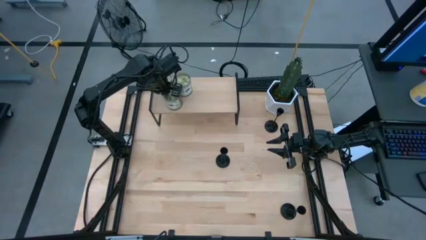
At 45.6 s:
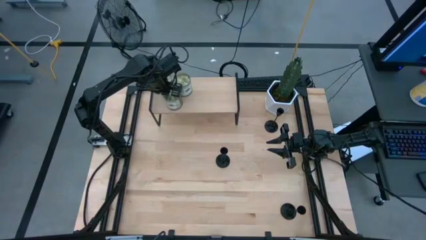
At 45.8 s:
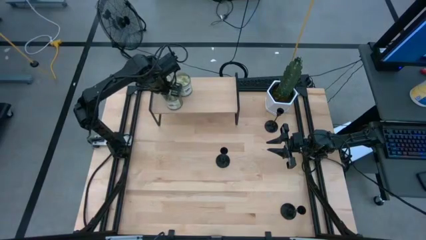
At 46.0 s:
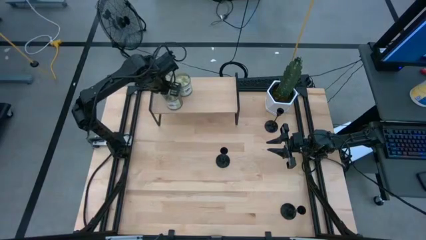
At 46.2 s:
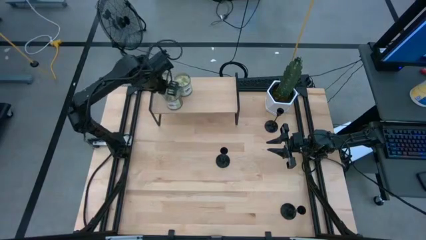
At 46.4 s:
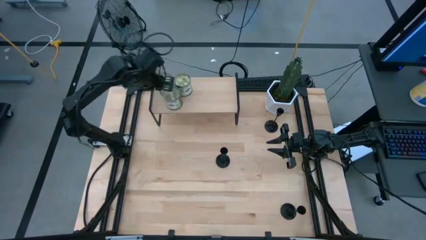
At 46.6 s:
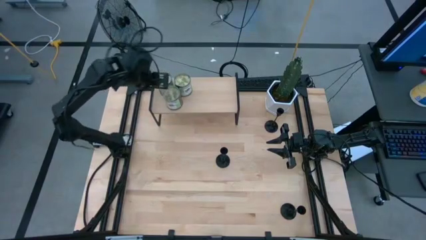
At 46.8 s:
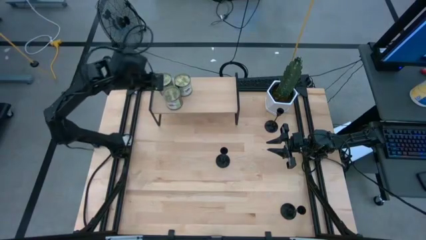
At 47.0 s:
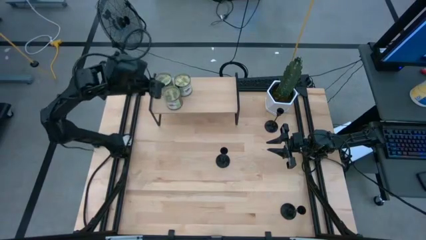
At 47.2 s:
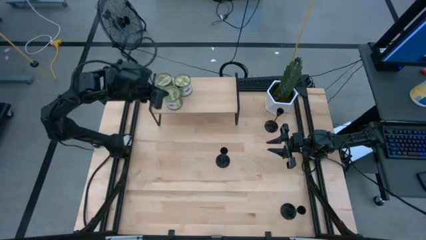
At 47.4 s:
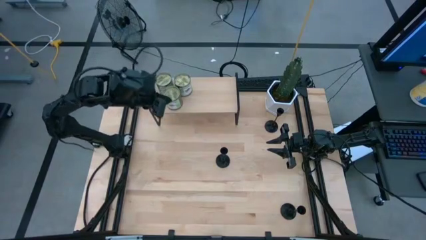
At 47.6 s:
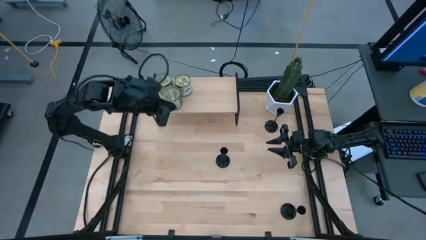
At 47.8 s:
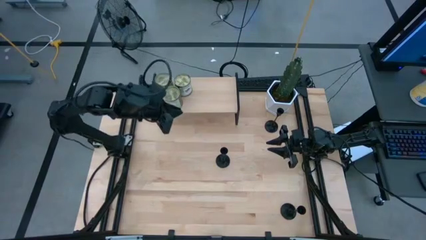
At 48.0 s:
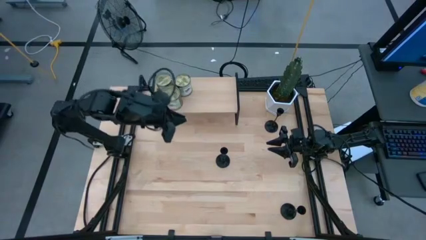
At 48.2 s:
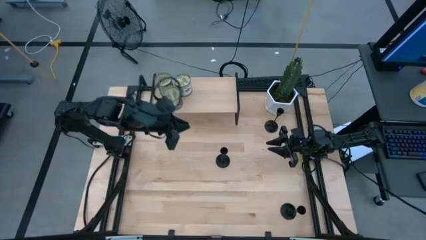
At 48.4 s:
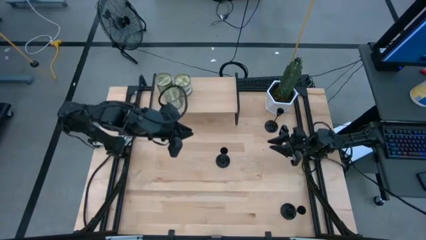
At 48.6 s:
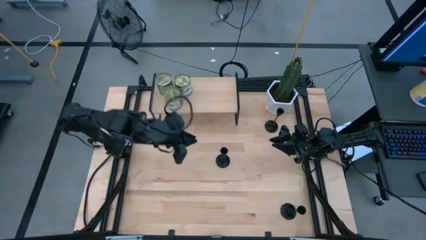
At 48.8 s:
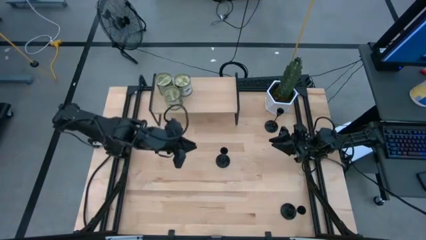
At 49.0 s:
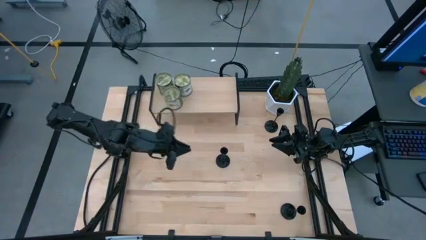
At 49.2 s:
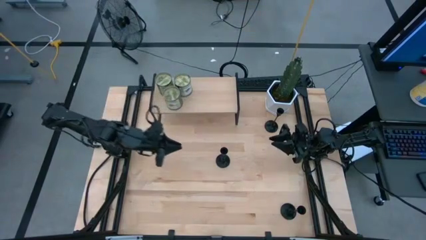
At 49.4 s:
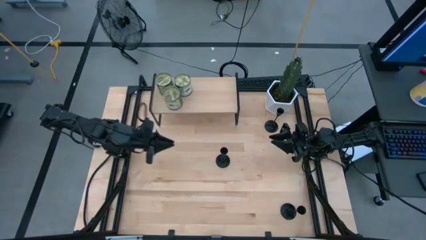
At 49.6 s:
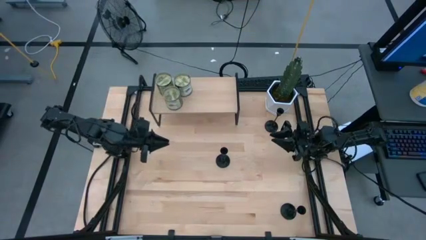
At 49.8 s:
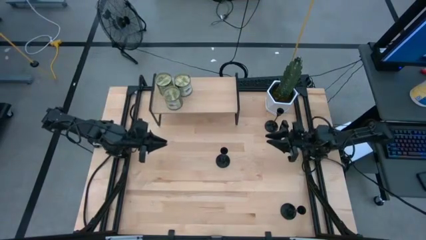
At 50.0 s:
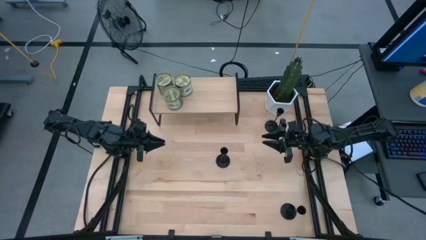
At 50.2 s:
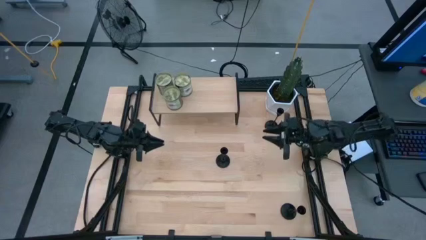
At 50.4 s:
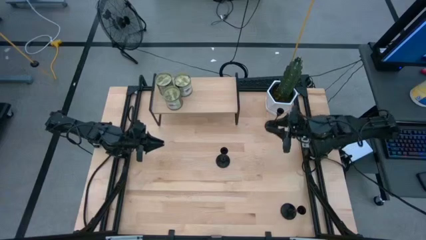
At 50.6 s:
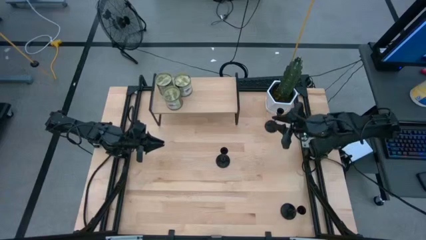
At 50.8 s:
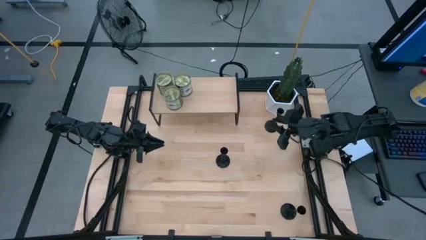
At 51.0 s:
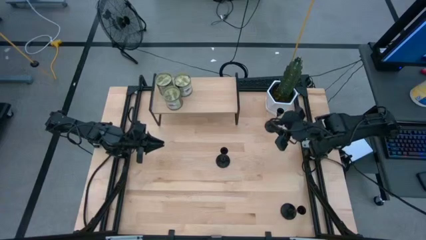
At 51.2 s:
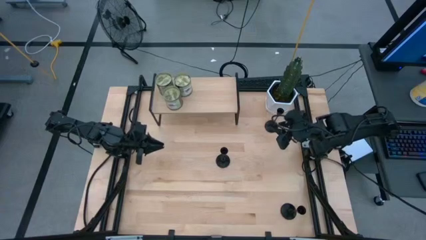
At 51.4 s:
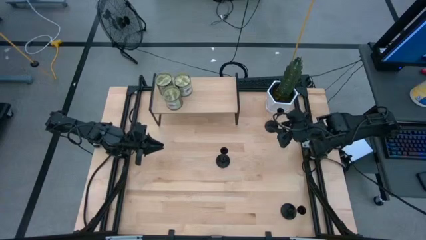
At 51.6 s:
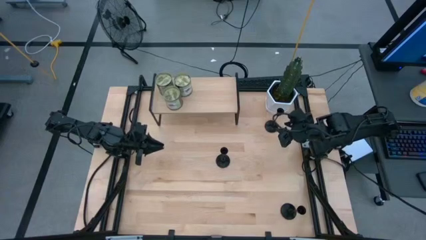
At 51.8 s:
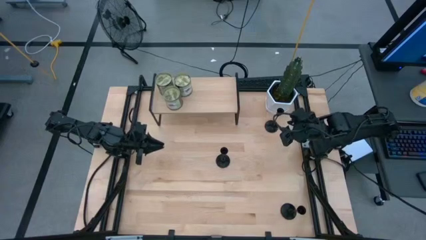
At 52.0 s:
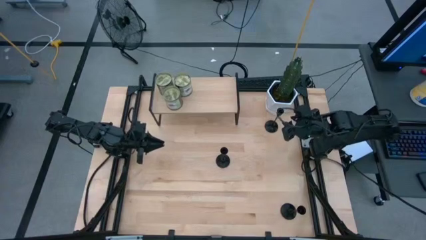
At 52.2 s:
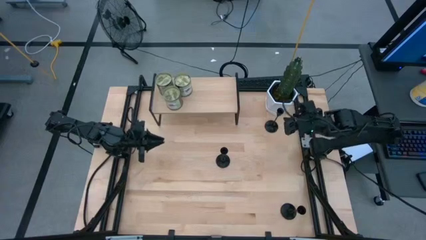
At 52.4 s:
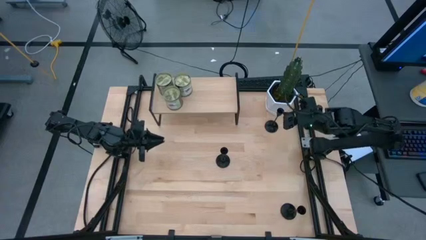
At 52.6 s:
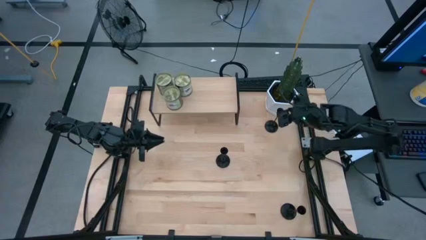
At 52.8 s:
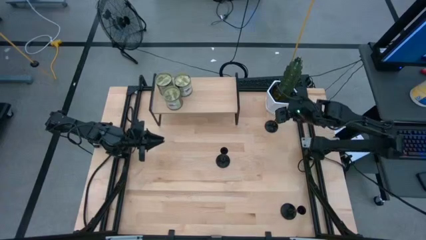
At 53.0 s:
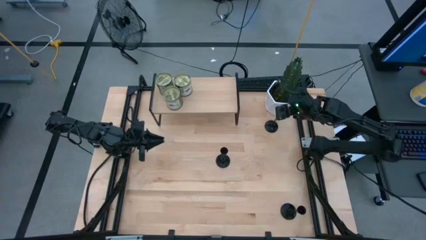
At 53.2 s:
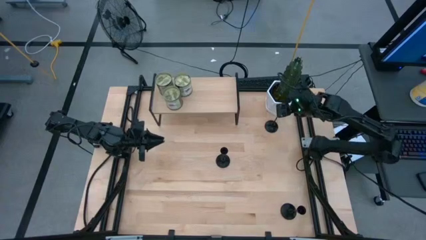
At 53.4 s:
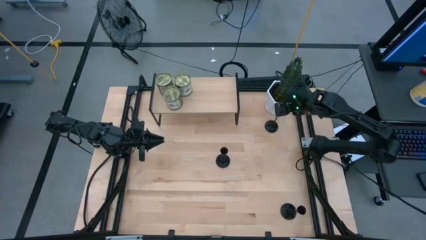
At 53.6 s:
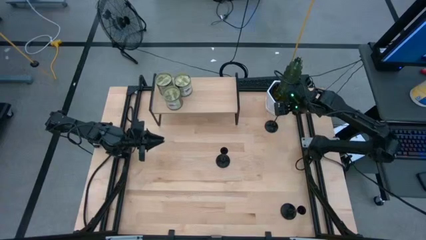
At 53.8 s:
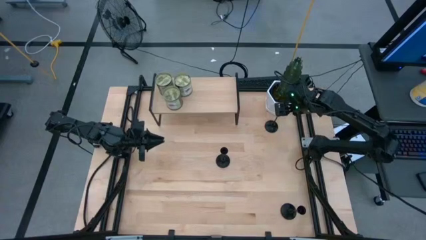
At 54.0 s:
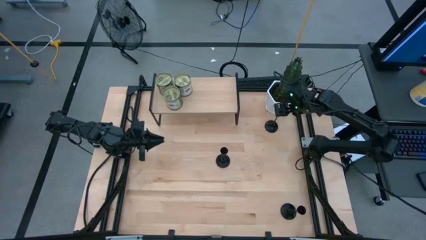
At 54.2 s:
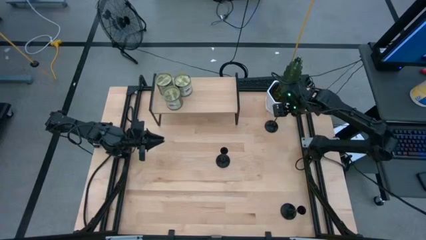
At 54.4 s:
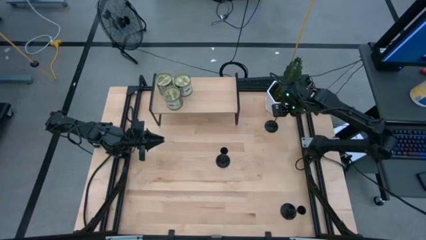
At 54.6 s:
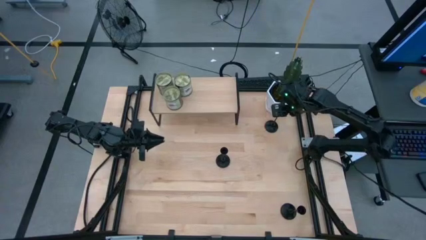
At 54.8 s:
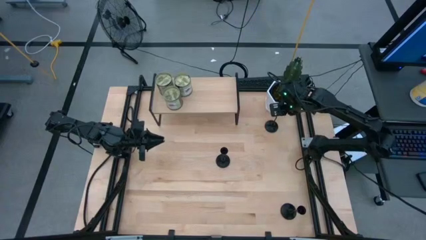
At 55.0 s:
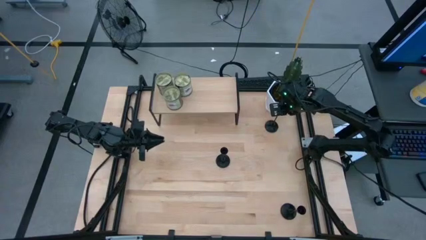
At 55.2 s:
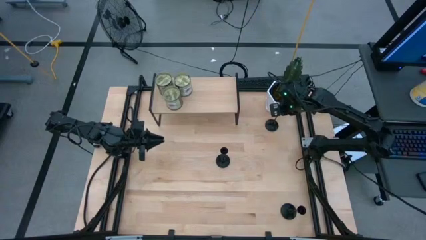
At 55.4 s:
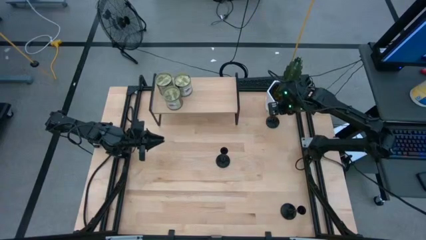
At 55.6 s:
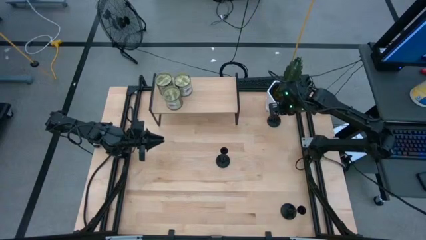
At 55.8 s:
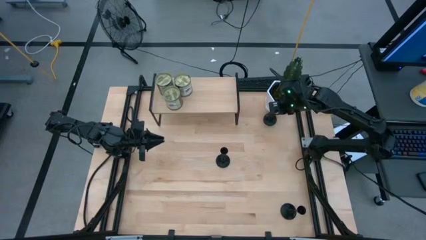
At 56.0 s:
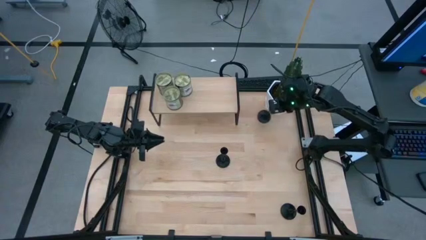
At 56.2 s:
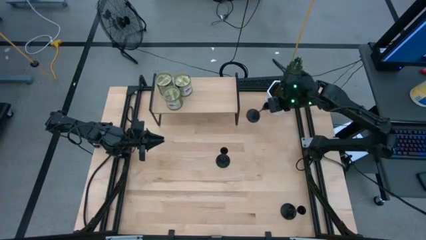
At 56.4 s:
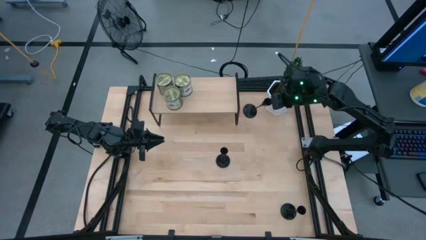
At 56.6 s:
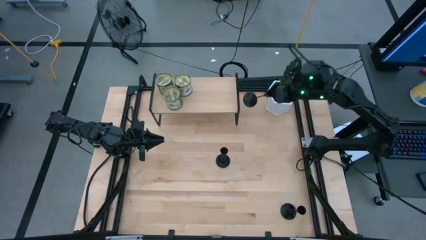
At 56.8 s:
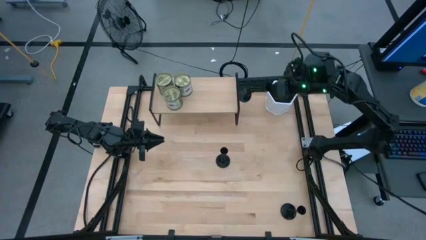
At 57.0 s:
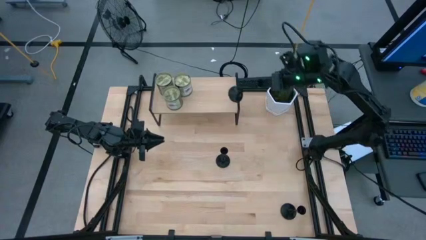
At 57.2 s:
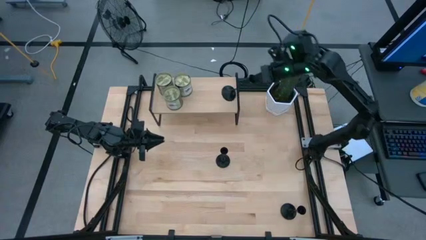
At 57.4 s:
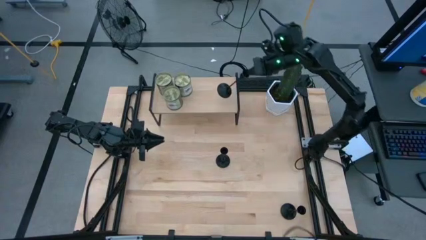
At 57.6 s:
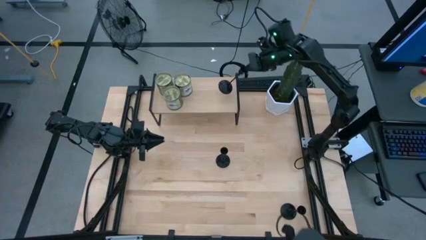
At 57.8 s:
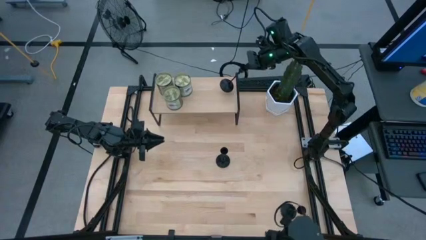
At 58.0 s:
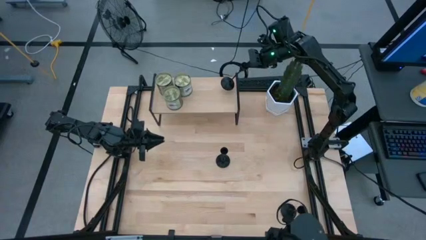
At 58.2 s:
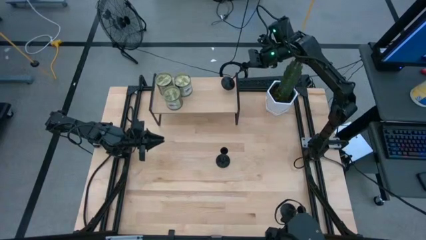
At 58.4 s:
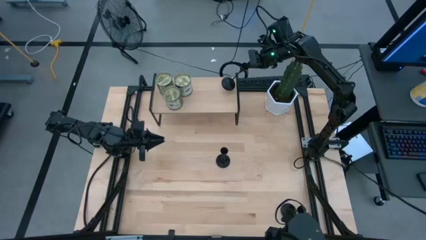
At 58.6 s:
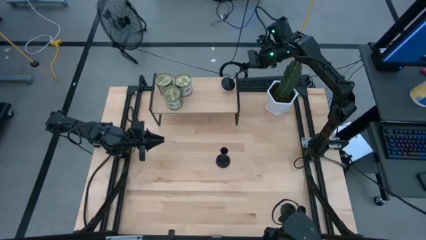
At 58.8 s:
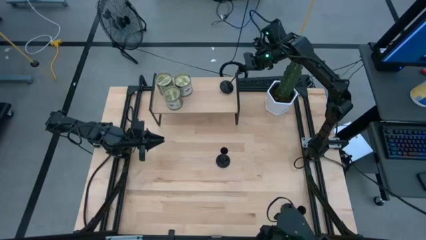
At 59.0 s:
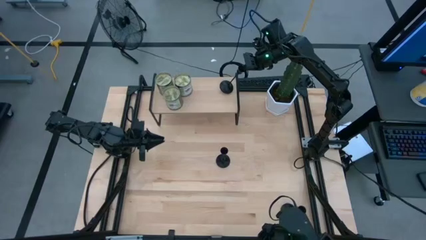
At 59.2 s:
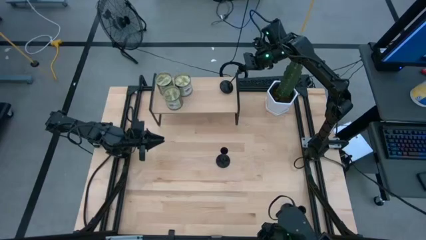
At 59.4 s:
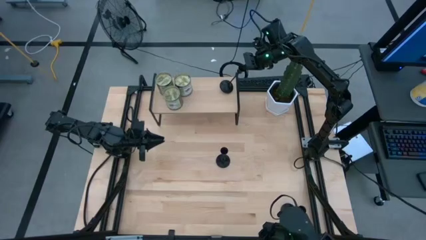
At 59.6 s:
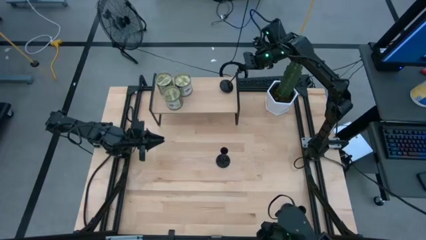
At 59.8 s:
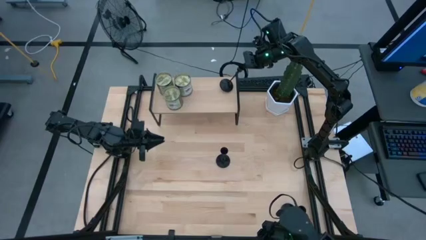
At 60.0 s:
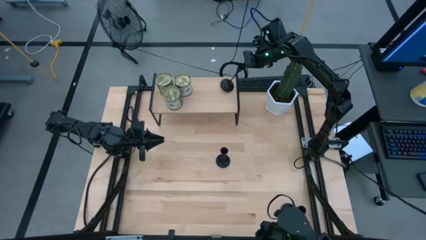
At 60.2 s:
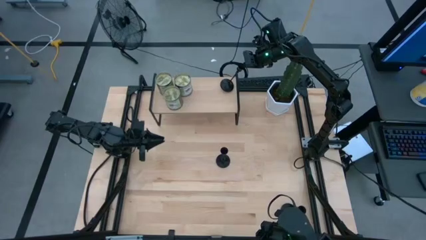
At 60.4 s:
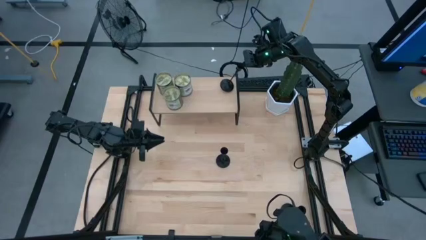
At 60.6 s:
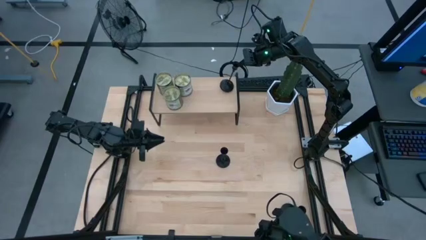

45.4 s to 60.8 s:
Task: Pick & Place candle stick holders
Put the top black candle holder on the shelf
